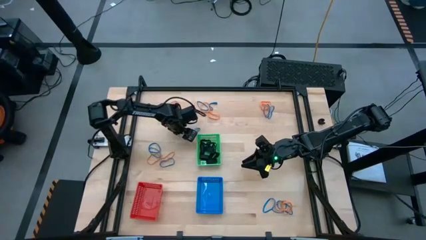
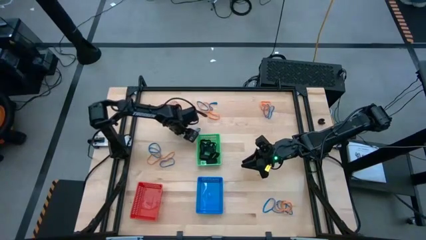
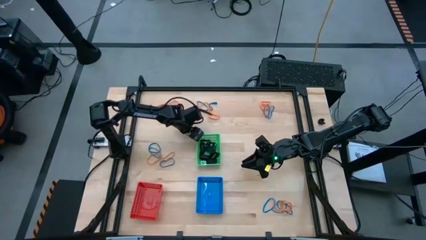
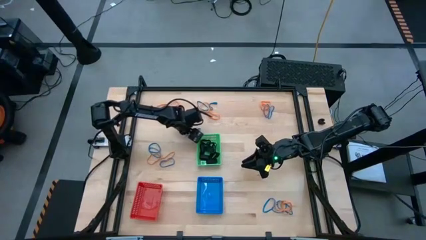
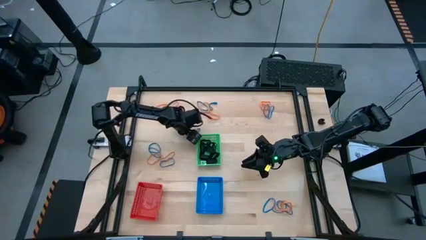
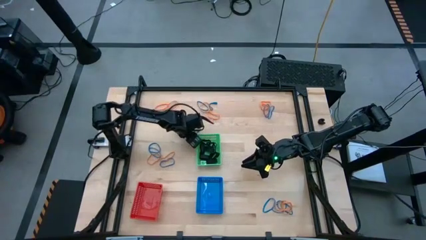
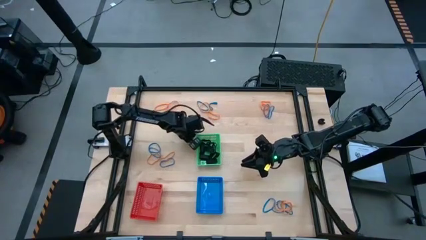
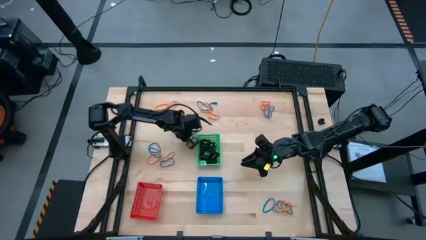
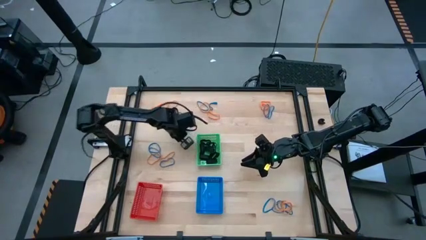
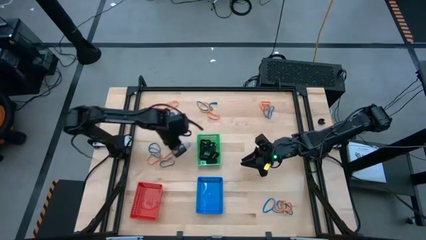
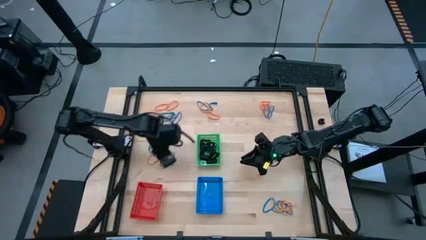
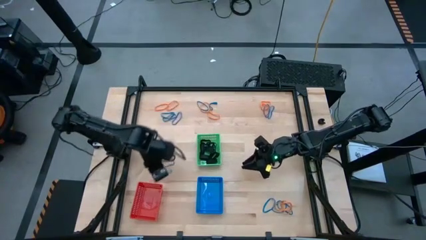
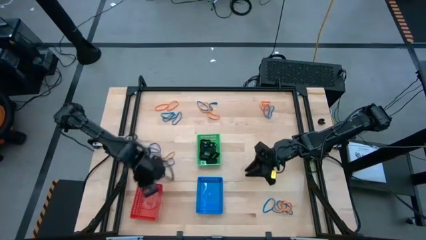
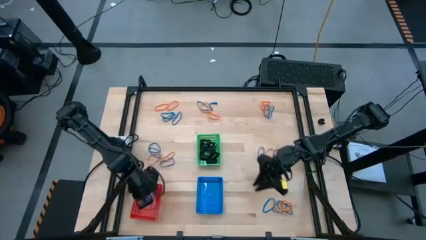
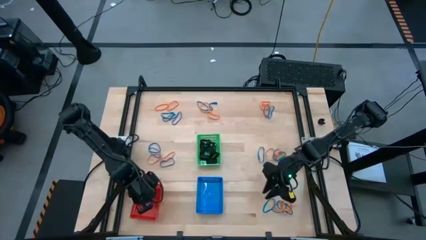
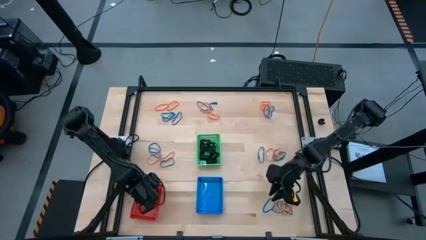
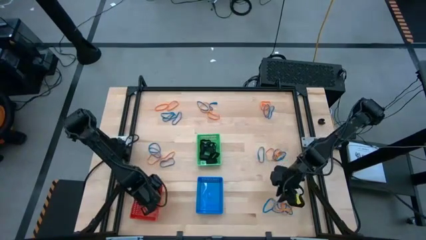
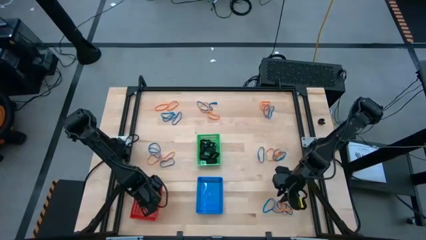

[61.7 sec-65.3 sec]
Task: Sort rubber bands into baskets
Put the blue rubberband into the red bin

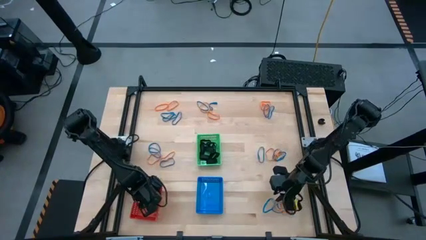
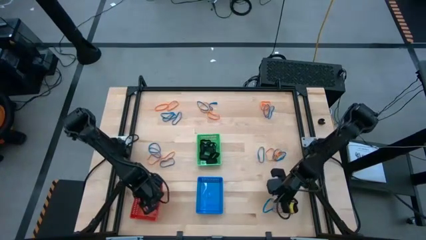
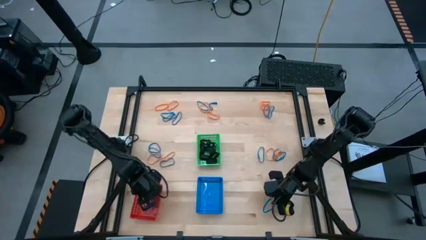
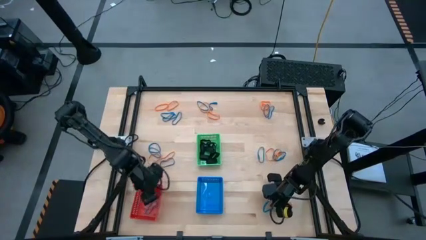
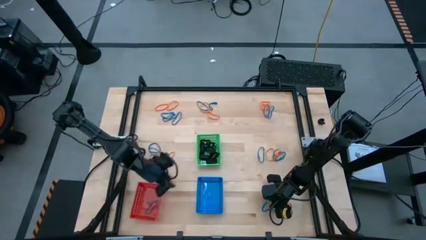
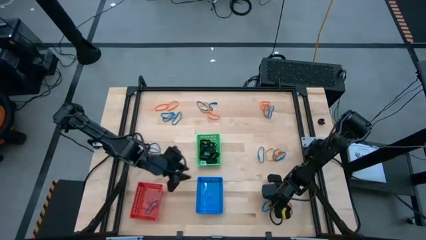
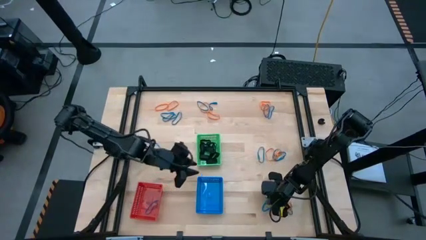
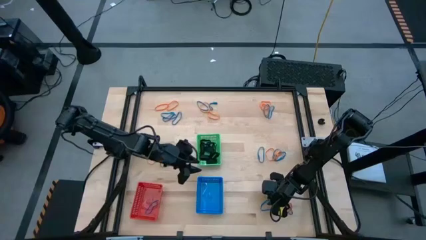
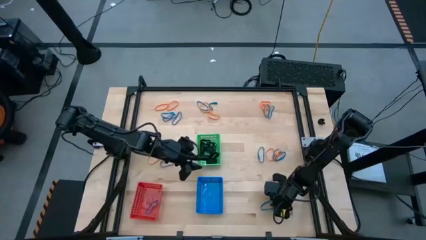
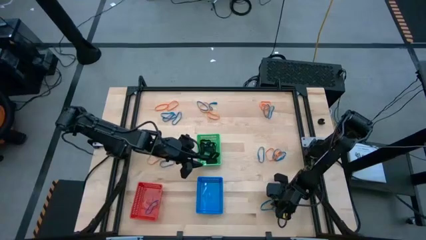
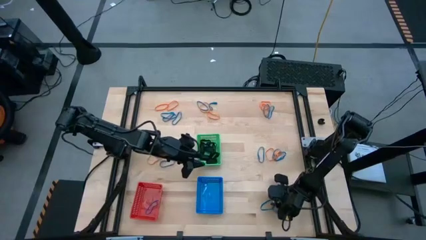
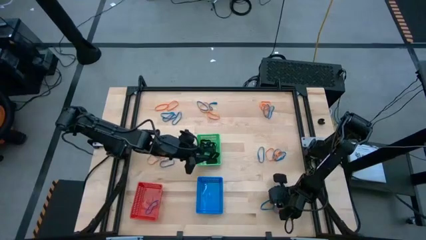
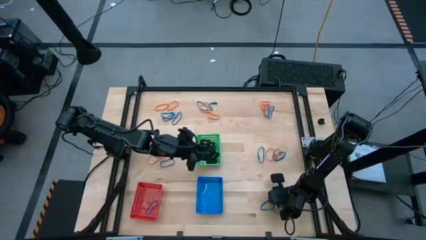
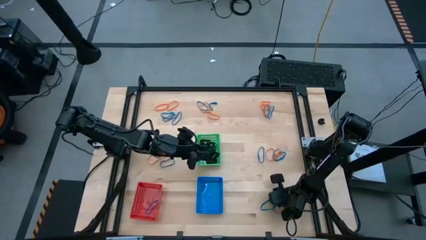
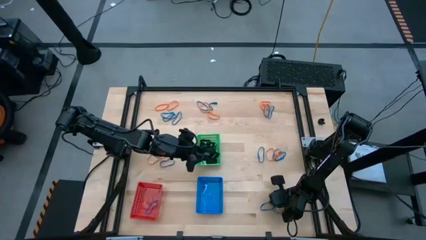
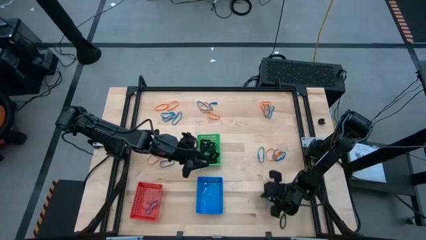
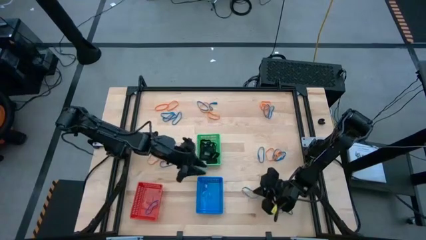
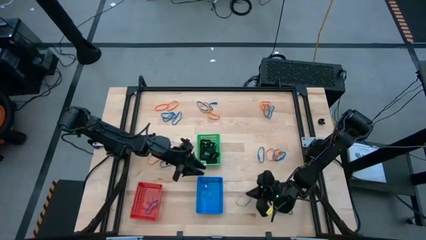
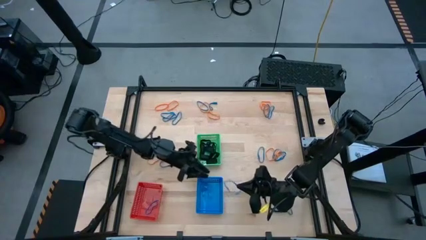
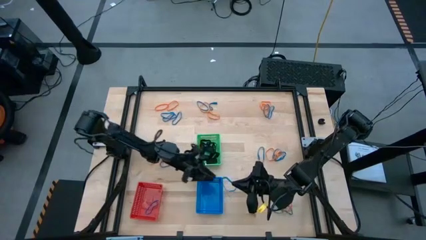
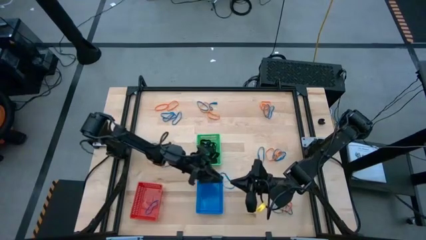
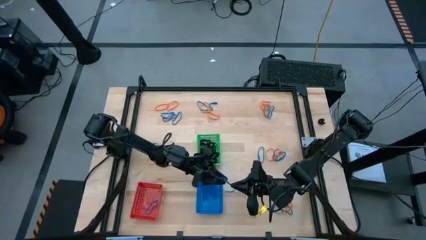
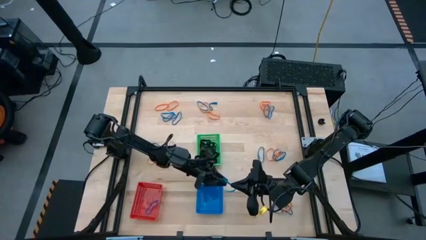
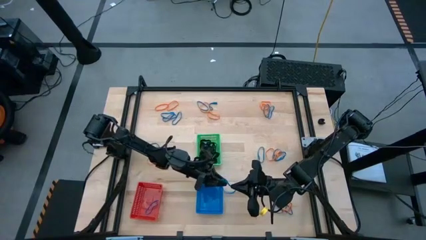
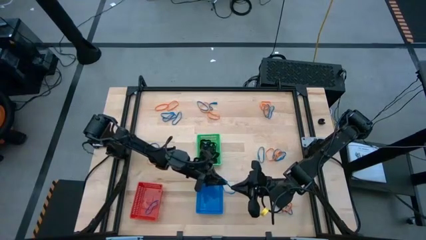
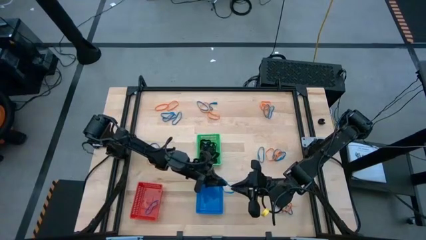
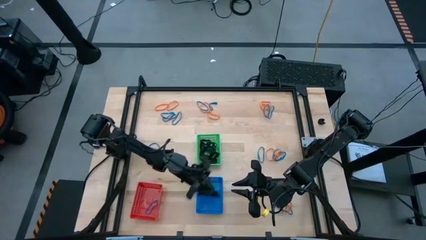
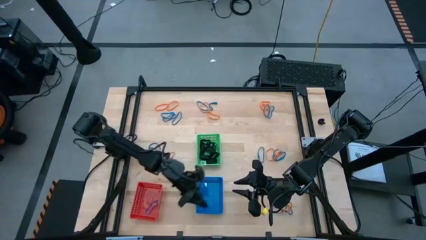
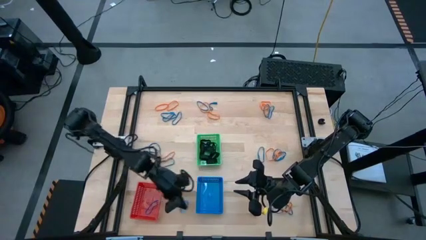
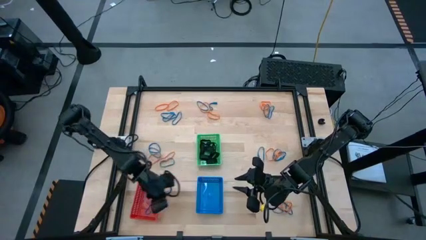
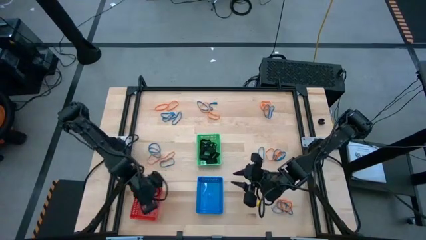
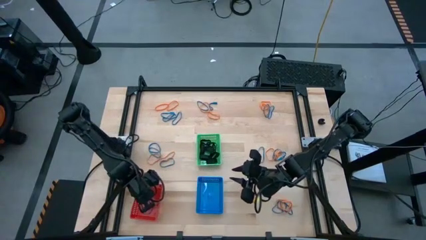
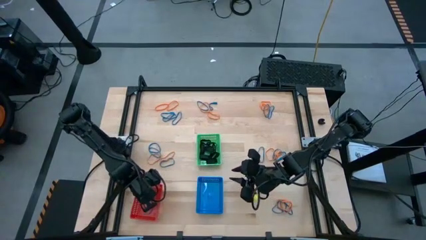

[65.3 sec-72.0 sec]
Put the blue rubberband into the red bin

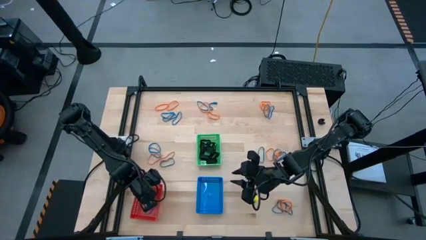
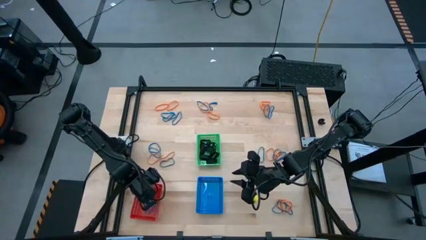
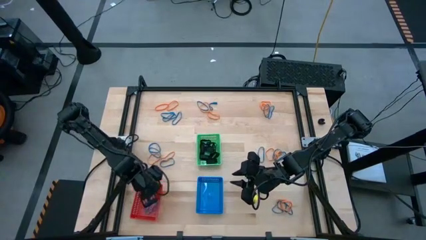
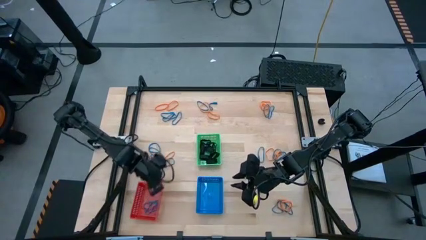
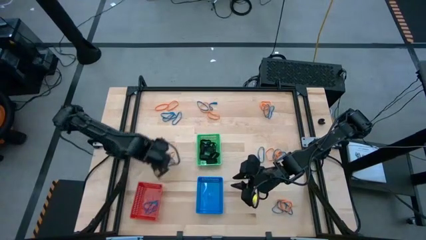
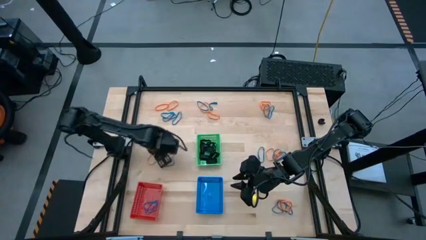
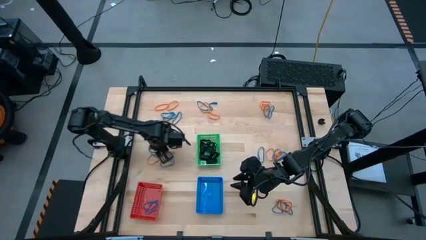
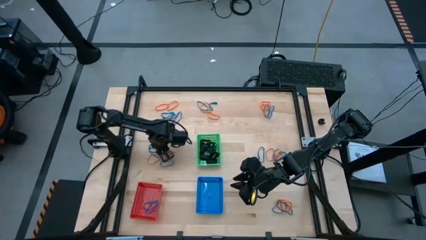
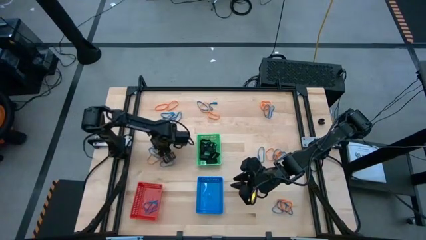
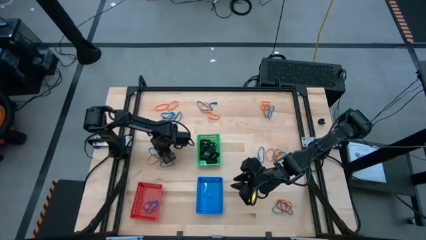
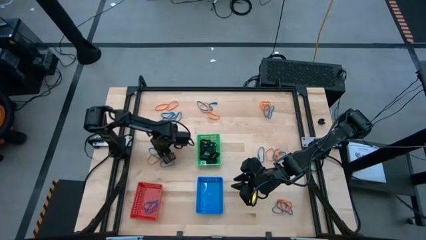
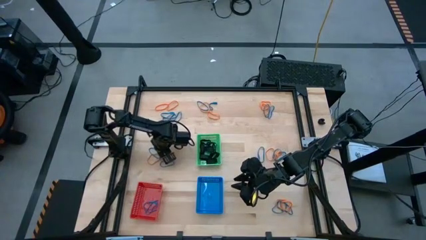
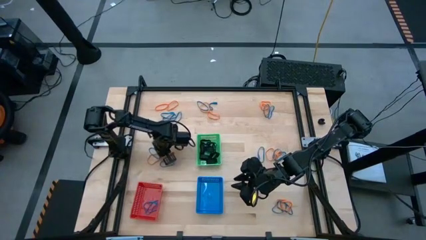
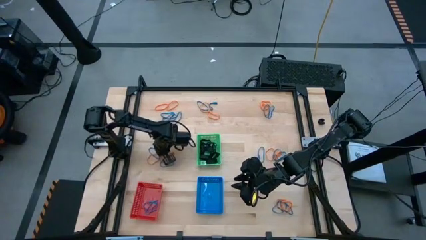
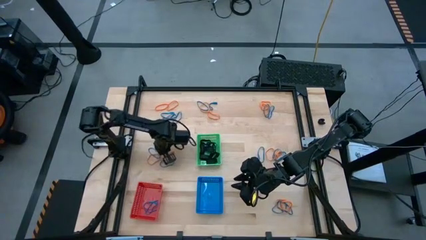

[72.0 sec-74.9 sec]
Put the blue rubberband into the red bin

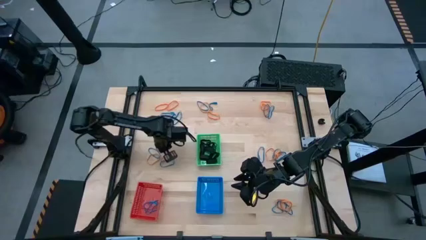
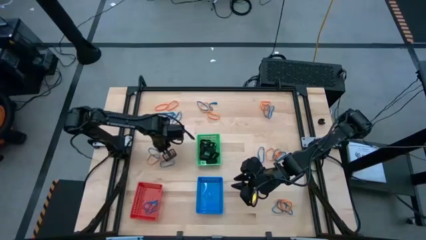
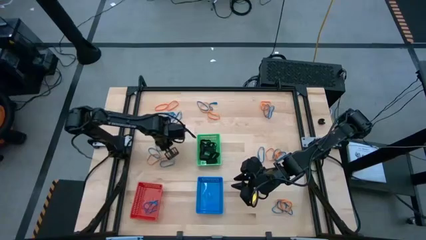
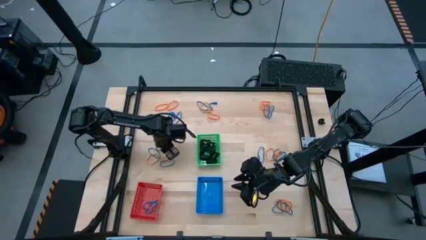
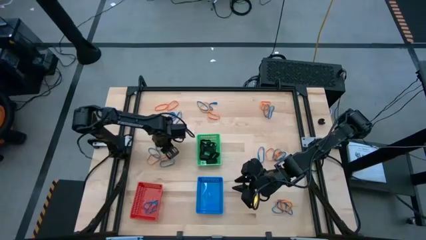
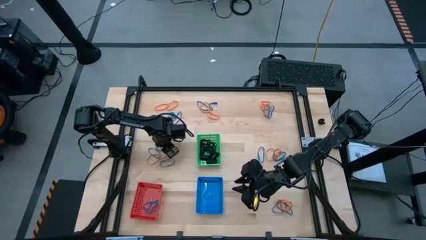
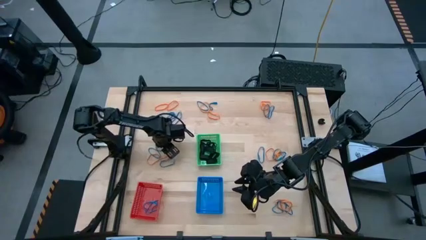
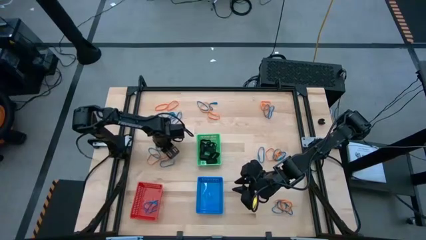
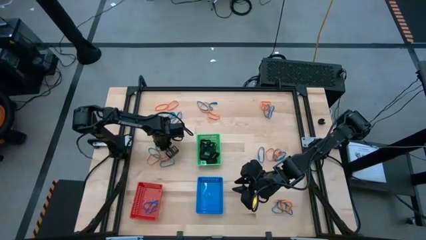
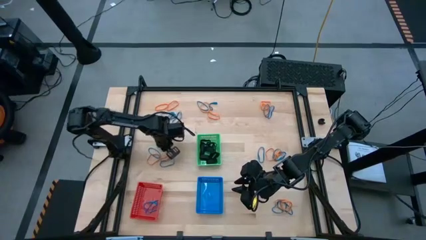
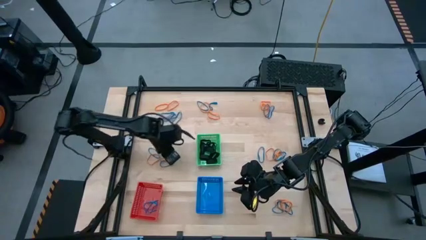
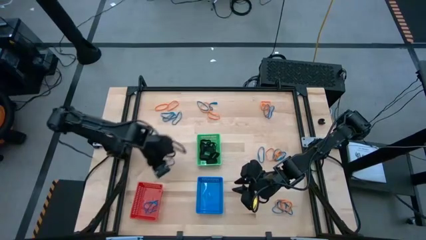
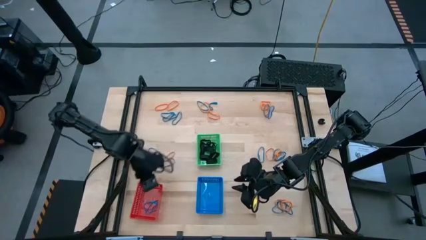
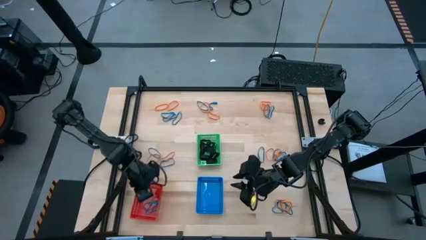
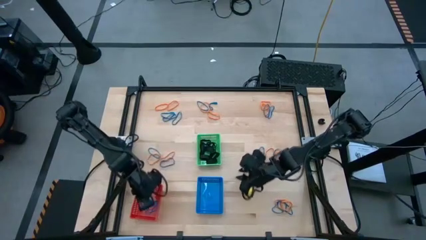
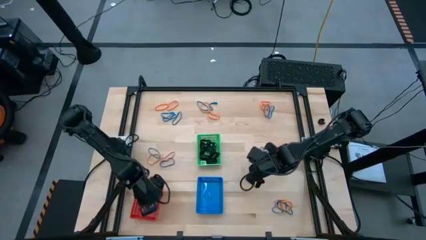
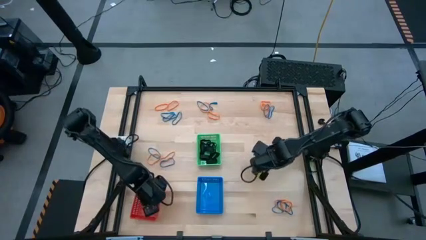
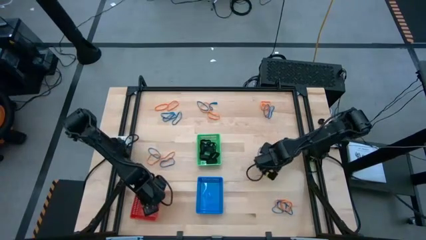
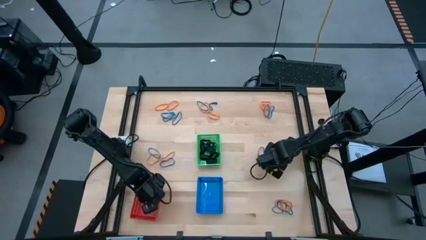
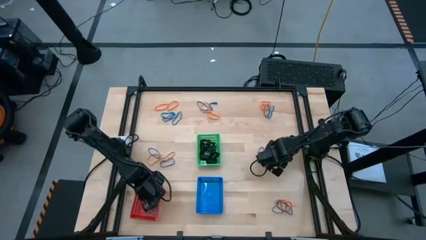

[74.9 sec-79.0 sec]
Put the blue rubberband into the red bin
